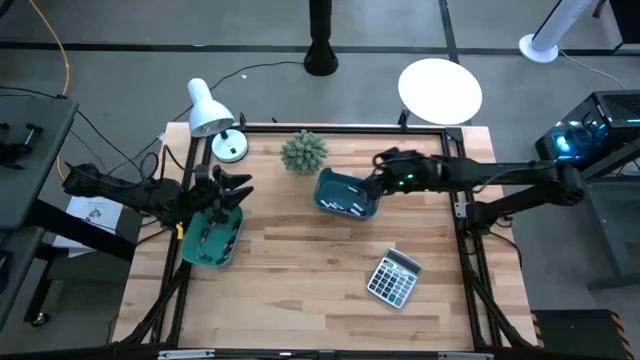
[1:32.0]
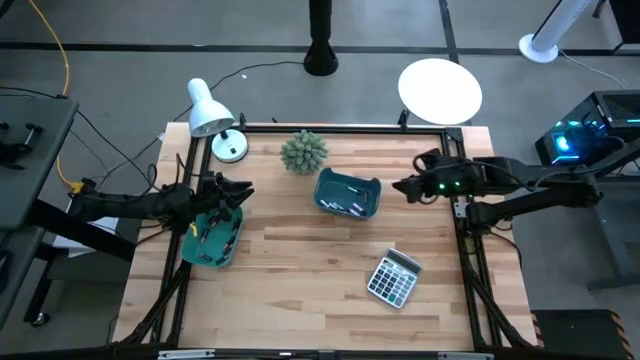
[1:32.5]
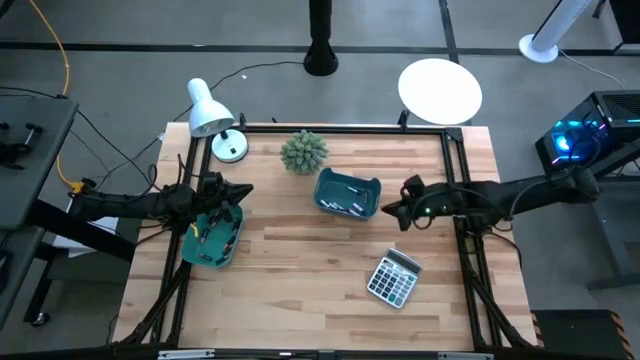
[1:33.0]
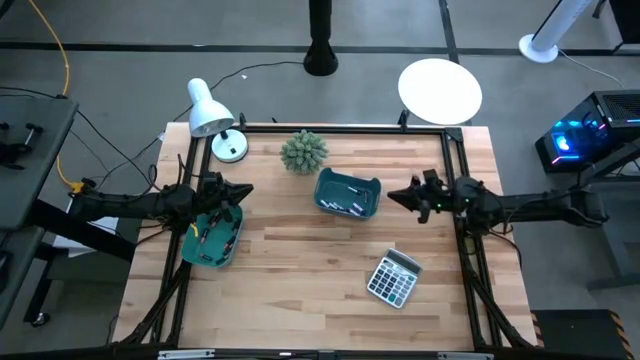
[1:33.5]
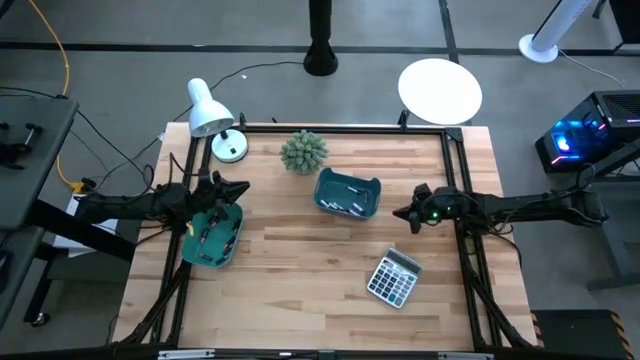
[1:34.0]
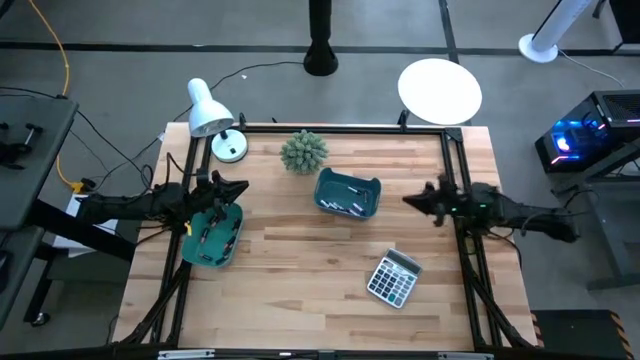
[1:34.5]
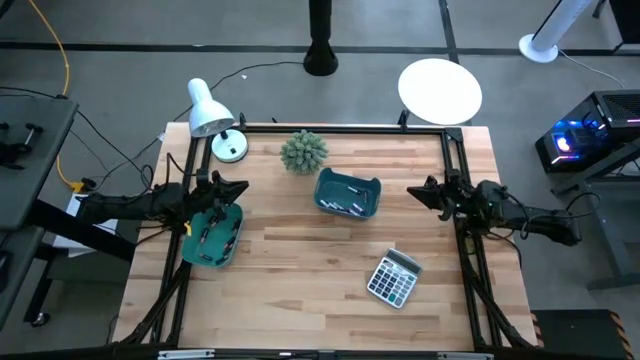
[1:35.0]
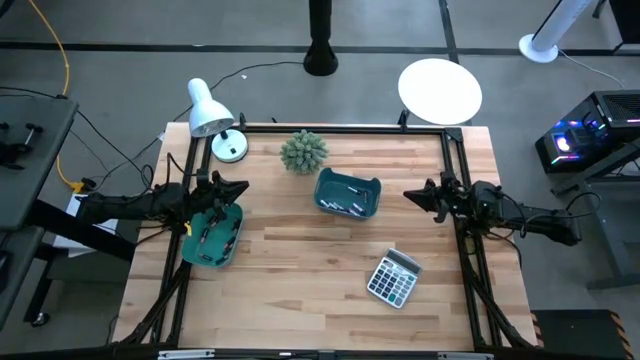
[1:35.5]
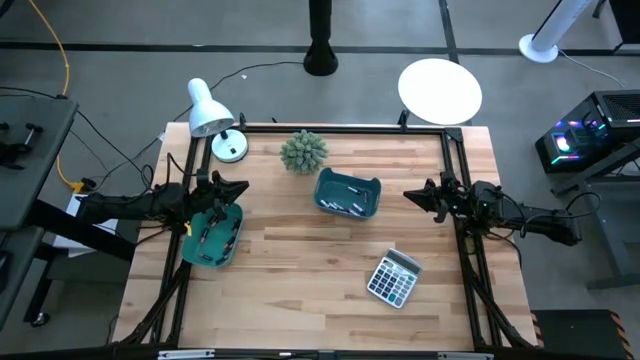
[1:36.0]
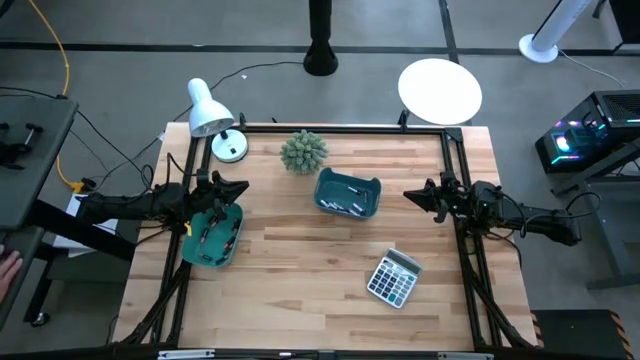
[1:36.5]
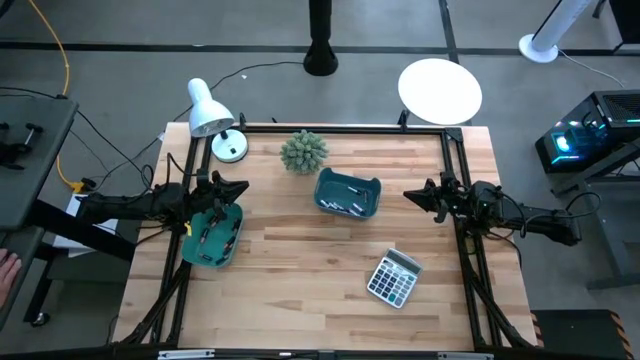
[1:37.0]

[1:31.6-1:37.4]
Task: Sort batteries
Return to Home Position

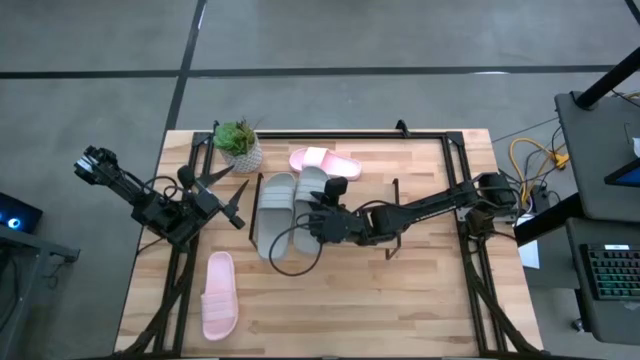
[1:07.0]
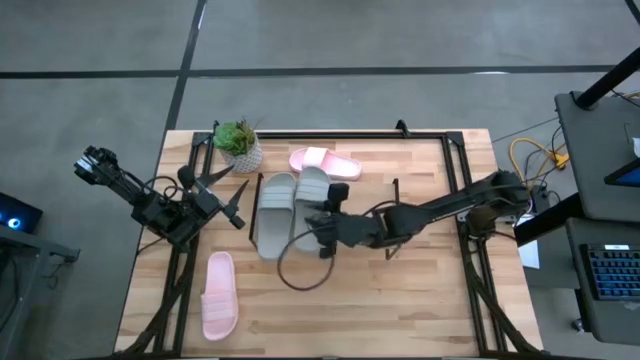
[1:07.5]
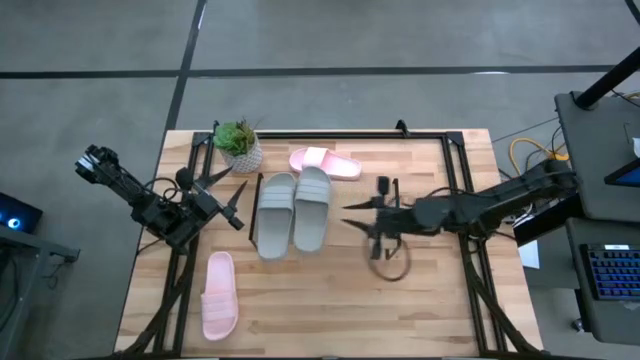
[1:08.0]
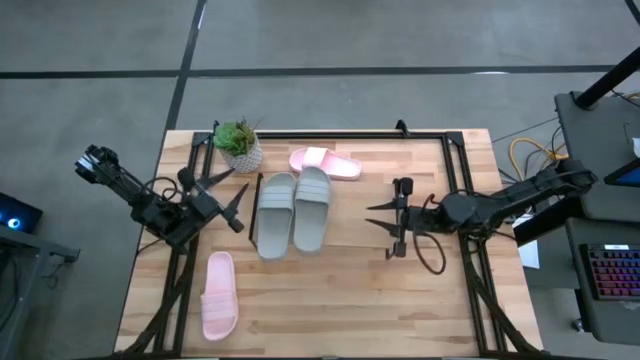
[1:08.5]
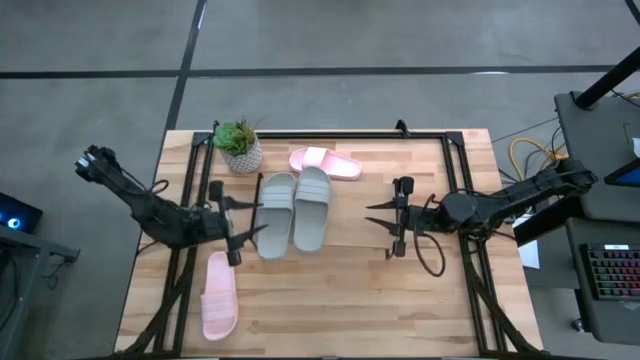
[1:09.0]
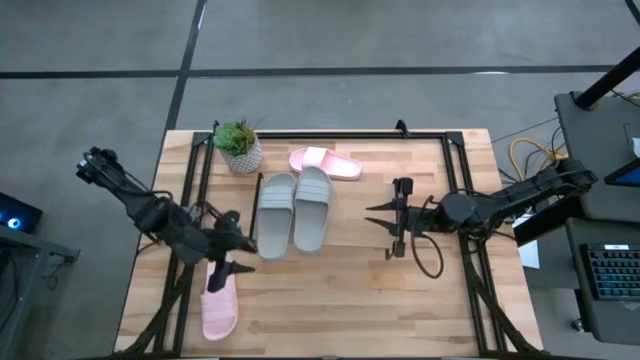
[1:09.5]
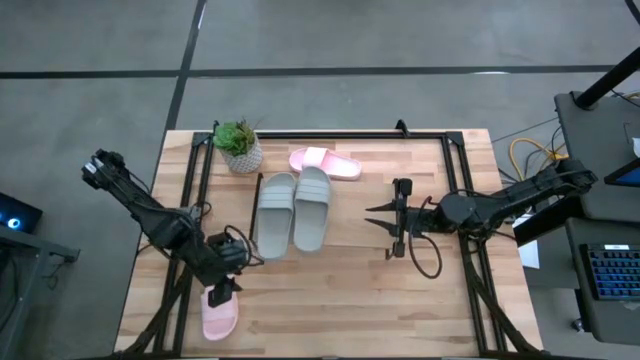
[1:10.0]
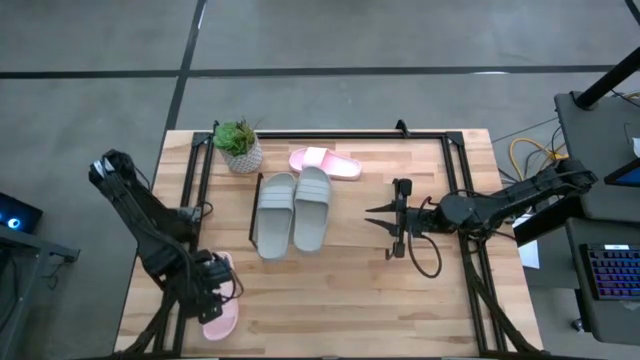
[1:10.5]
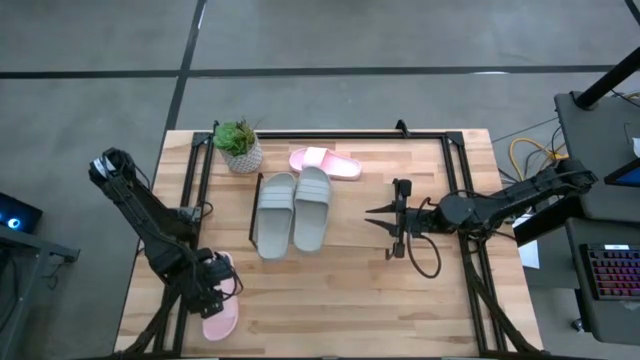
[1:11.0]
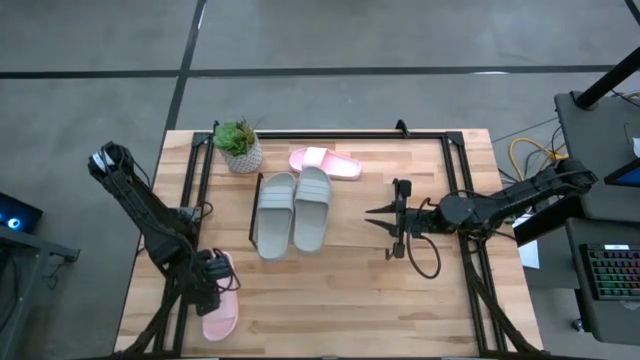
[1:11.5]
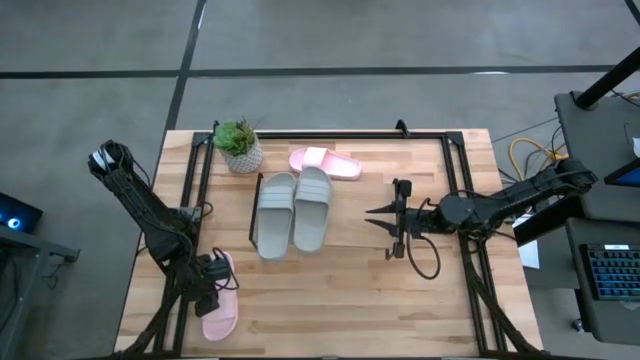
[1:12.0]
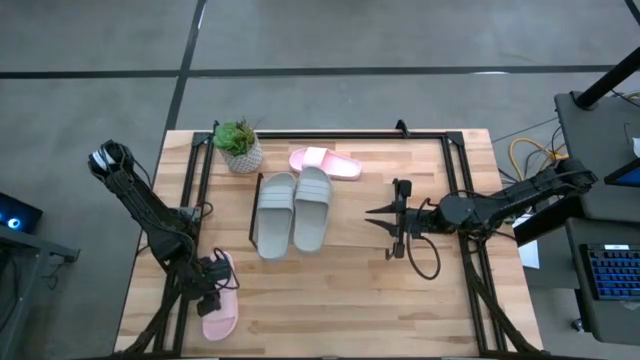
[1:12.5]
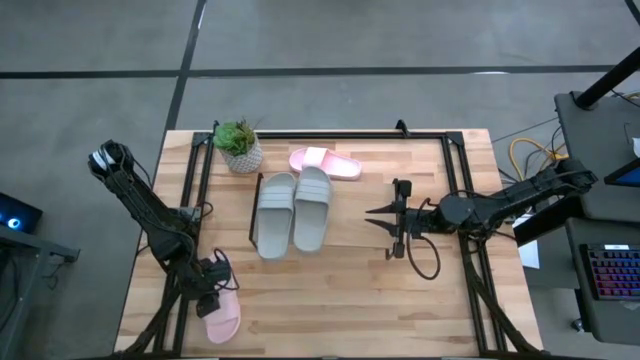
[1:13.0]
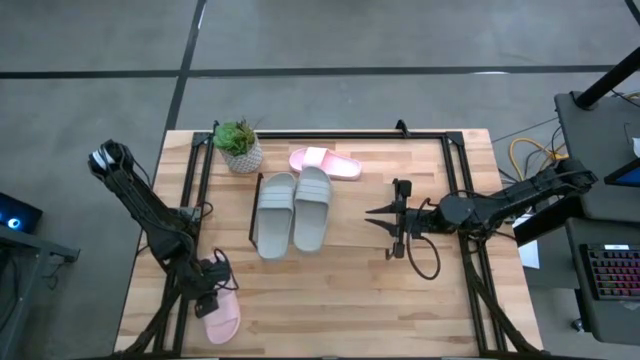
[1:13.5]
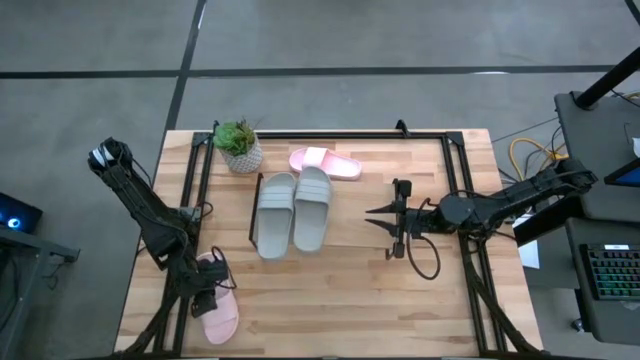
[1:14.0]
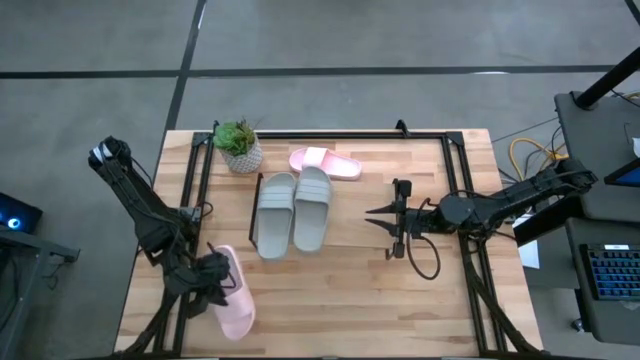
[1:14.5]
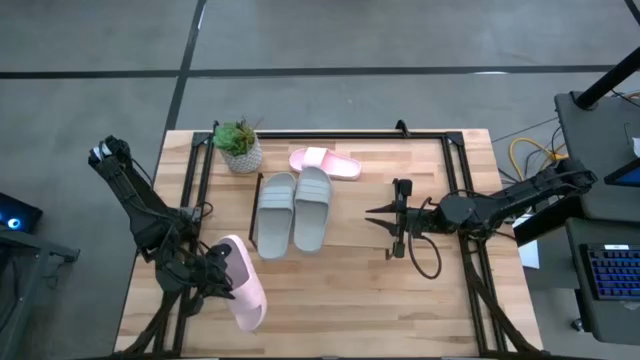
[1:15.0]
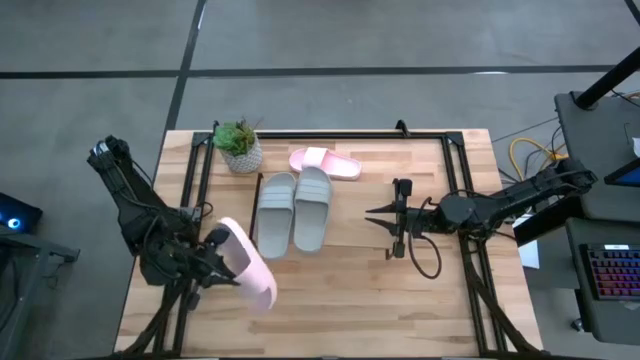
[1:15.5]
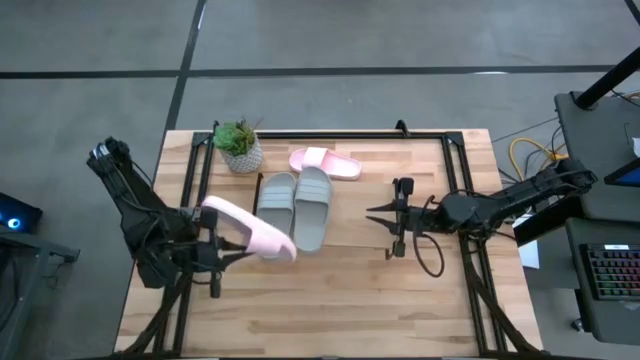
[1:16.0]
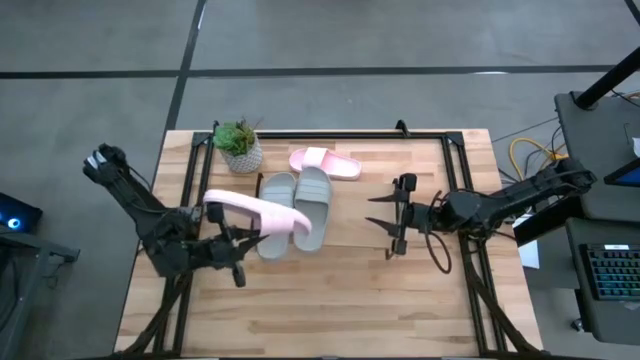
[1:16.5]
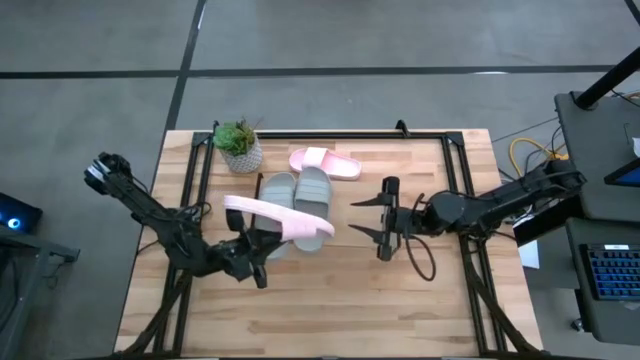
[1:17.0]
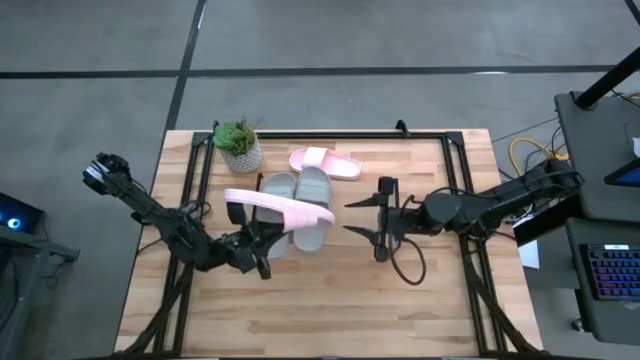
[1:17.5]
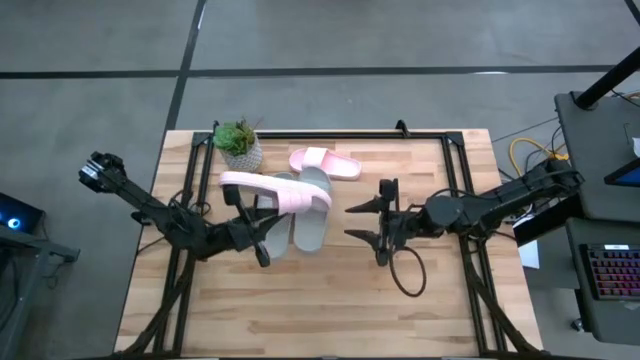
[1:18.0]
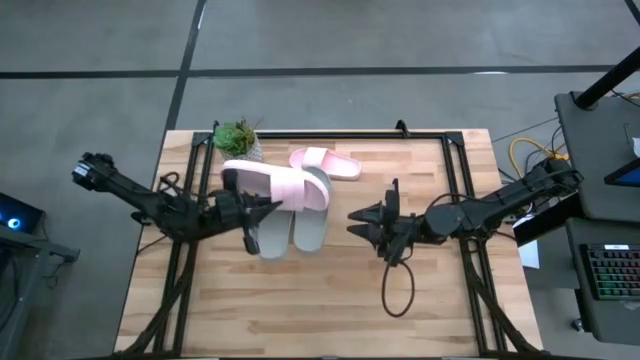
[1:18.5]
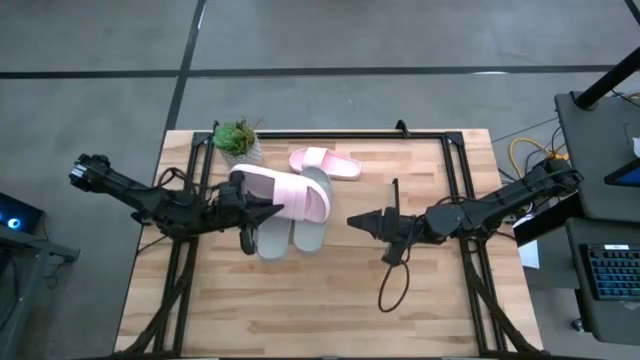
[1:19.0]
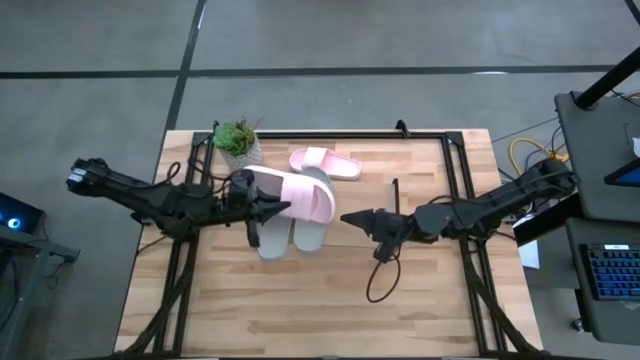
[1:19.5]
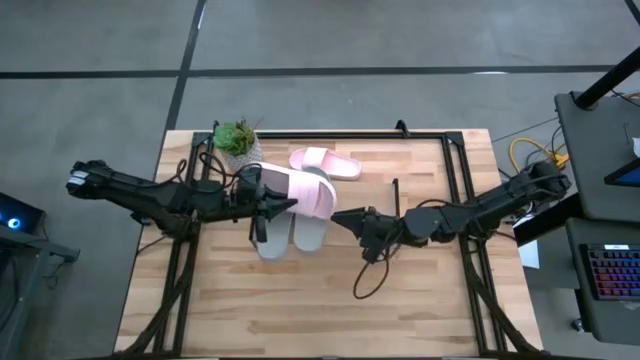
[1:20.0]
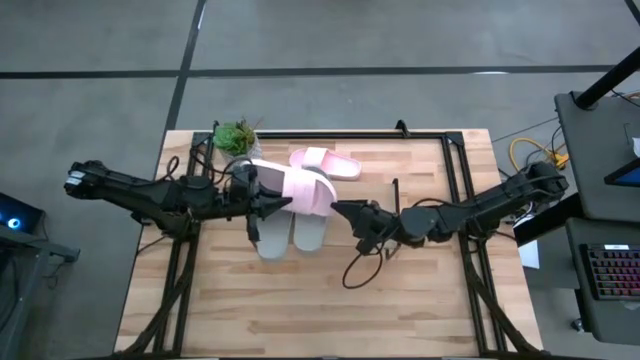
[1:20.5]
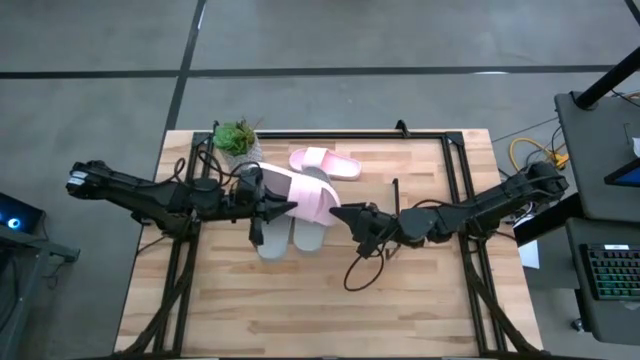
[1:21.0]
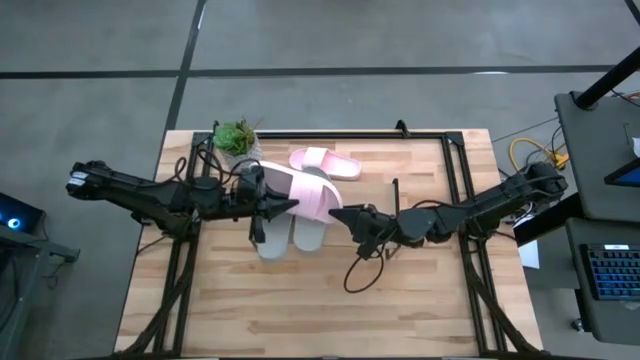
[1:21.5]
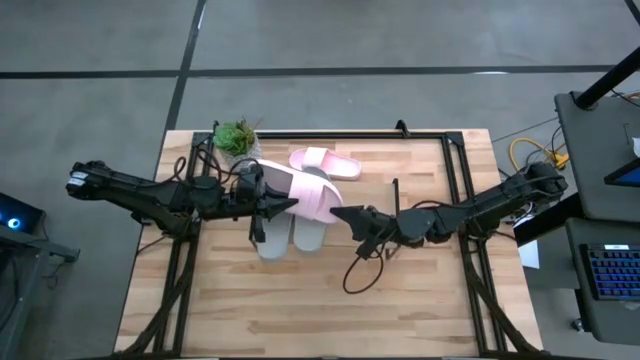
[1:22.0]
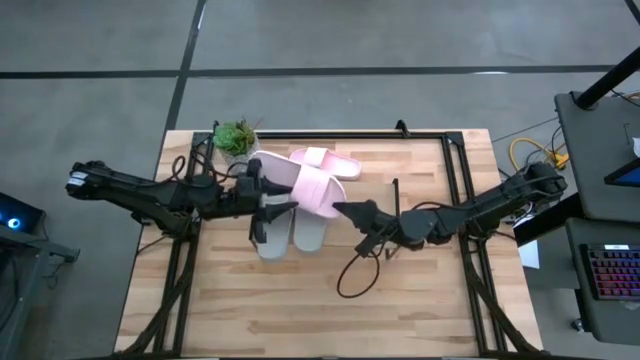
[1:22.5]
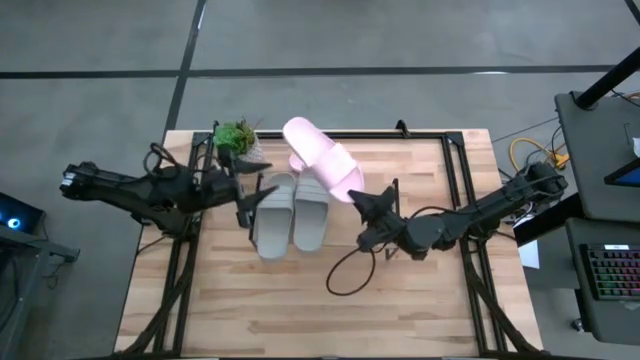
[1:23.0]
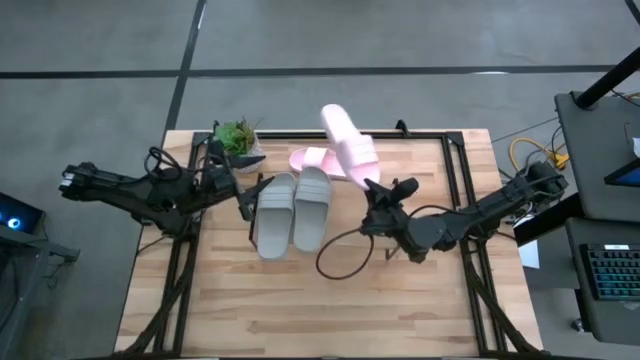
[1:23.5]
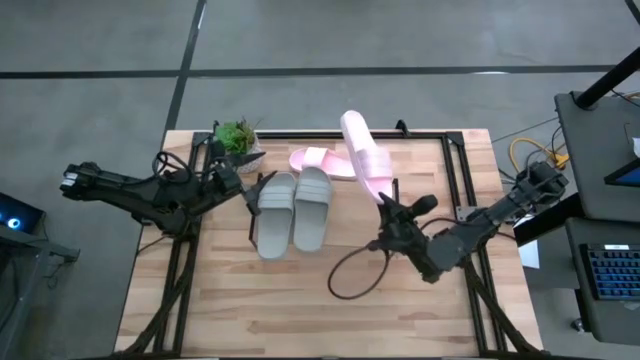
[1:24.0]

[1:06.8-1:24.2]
Task: Pick and place slides into the shelf
Put the bottom pink slide on the shelf
